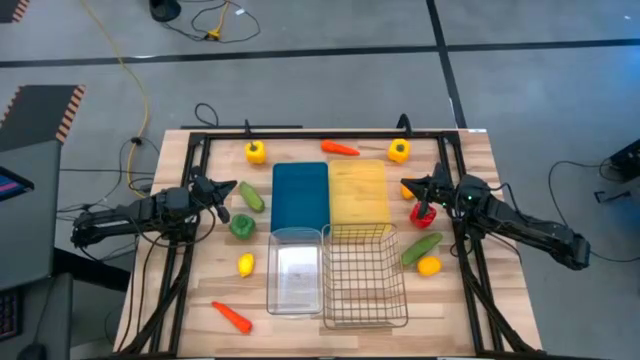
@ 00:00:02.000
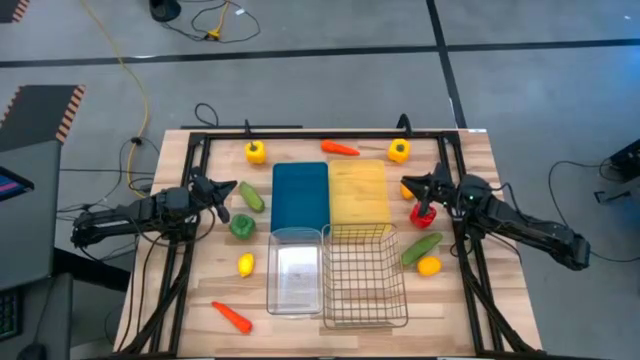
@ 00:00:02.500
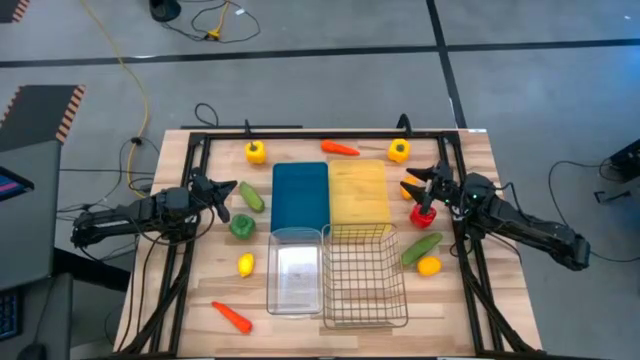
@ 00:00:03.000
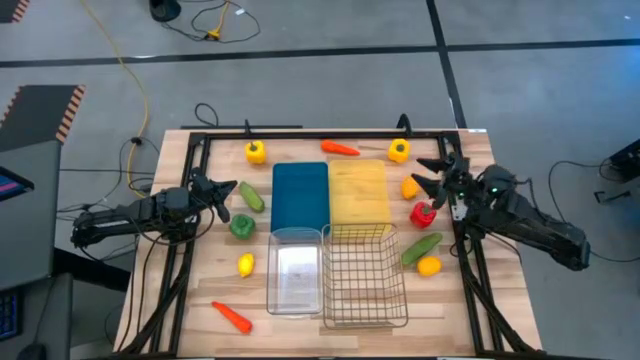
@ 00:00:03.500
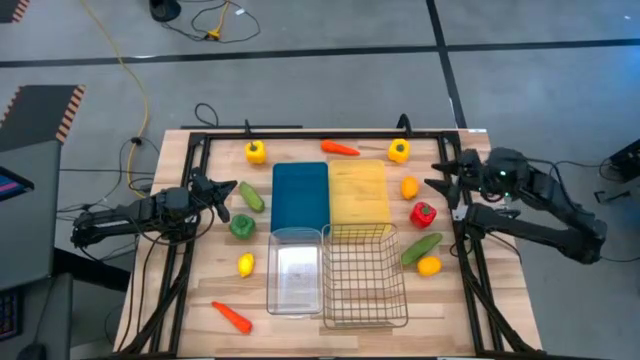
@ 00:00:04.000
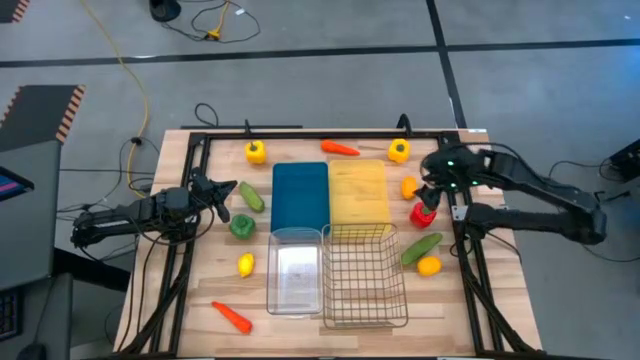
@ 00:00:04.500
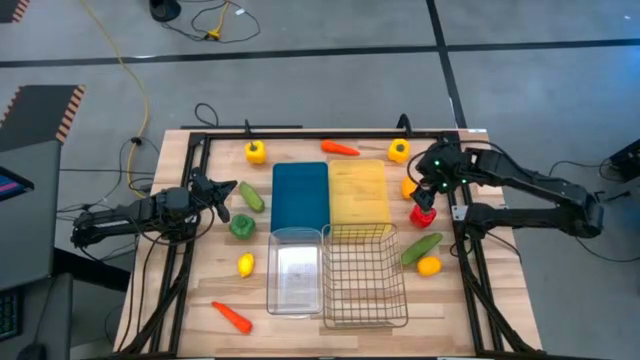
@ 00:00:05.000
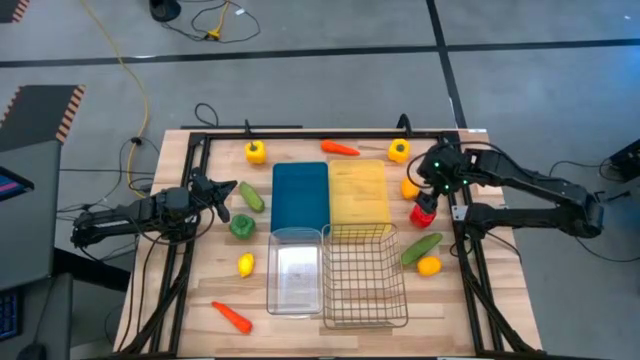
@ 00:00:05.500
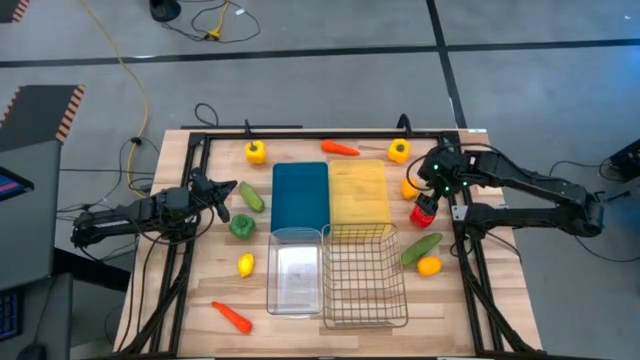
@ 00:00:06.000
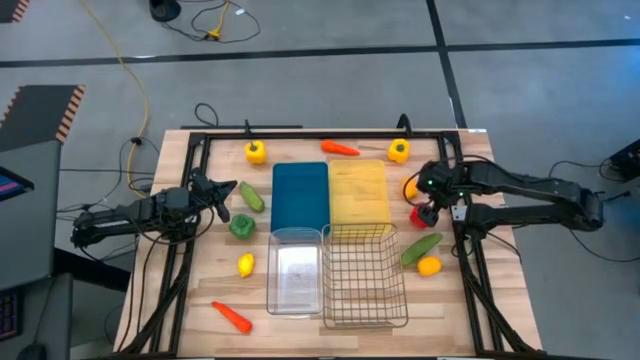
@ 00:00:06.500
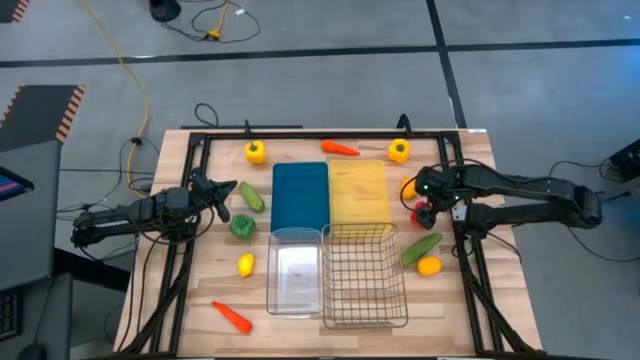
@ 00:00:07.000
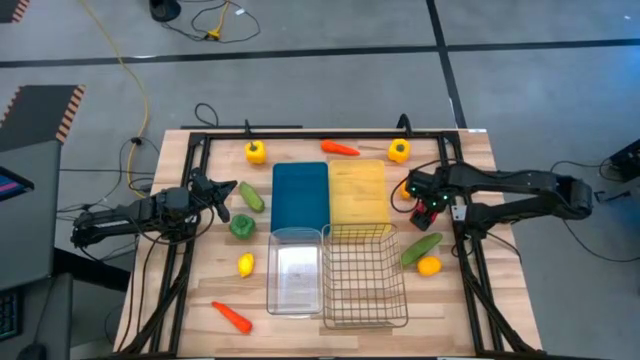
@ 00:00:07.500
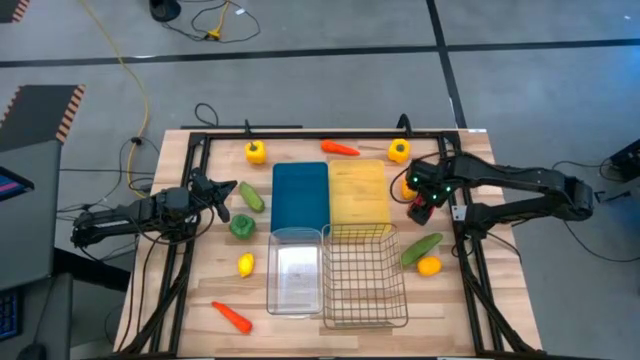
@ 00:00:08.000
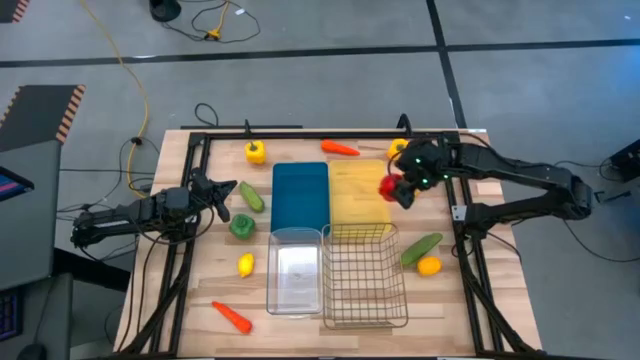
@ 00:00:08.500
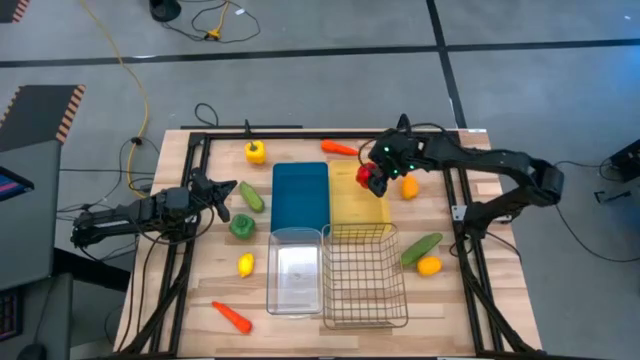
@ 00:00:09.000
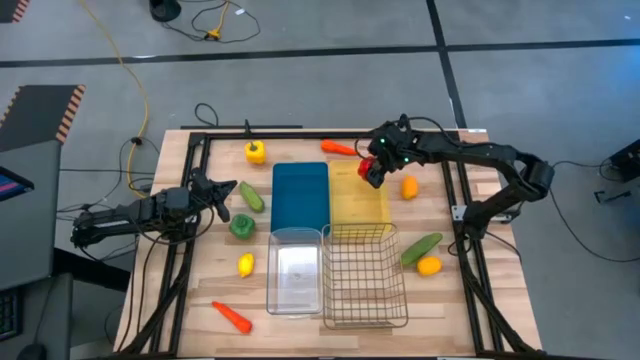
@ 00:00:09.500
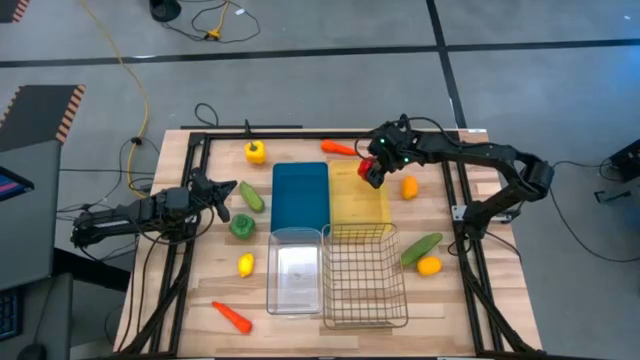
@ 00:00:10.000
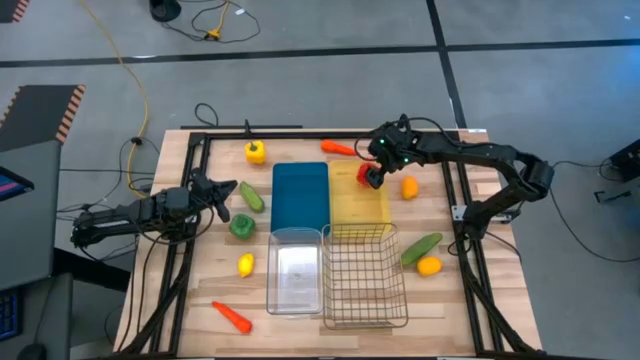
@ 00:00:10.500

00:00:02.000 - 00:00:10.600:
Task: Sort produce into baskets
Put the red bell pepper into the yellow basket

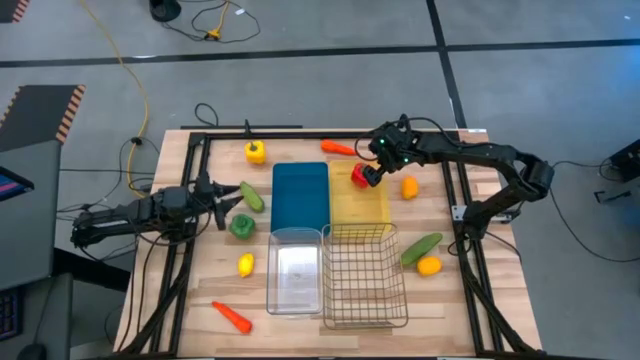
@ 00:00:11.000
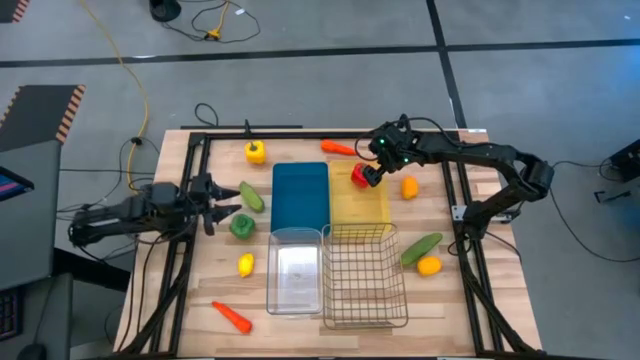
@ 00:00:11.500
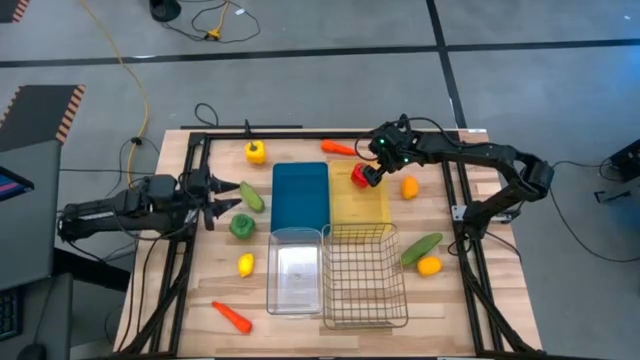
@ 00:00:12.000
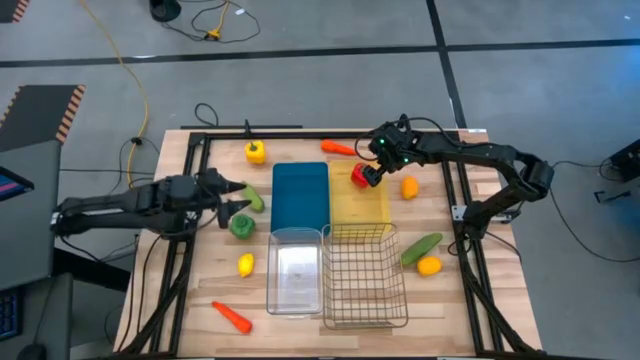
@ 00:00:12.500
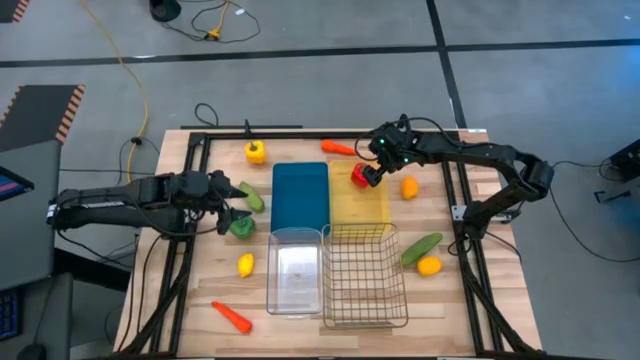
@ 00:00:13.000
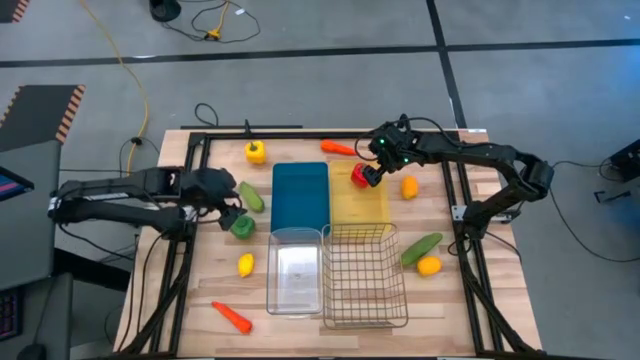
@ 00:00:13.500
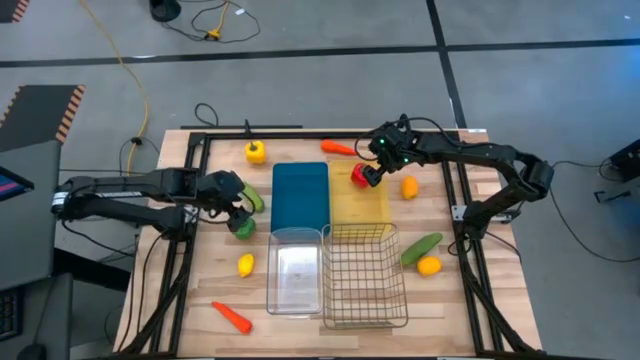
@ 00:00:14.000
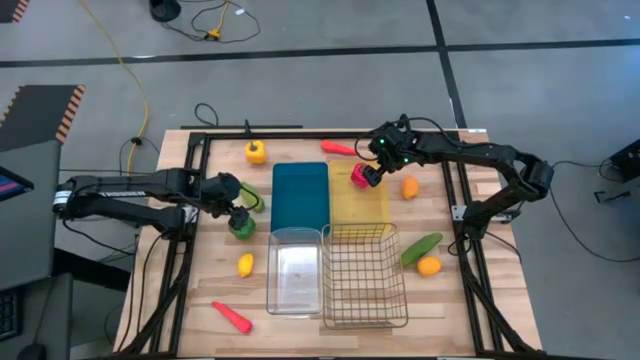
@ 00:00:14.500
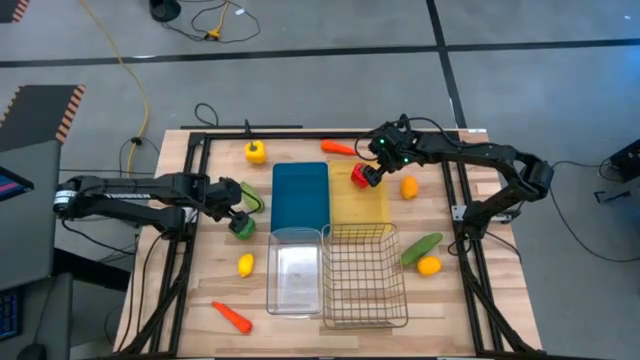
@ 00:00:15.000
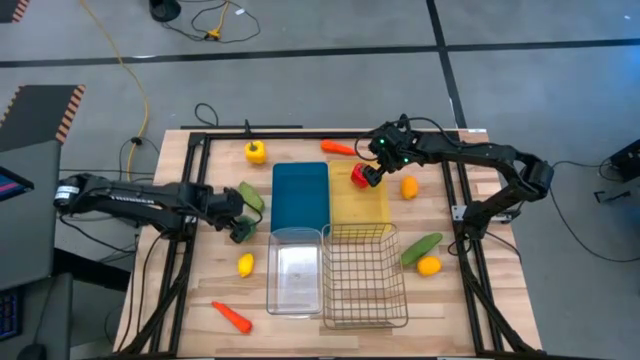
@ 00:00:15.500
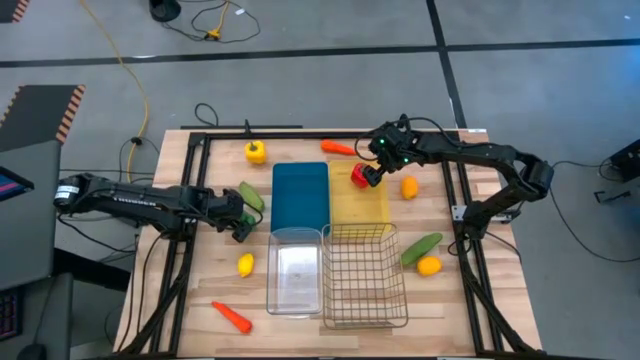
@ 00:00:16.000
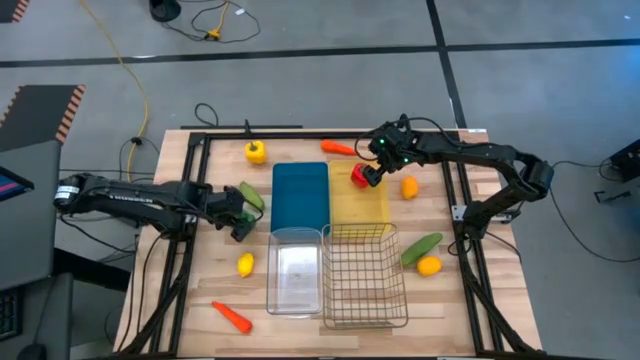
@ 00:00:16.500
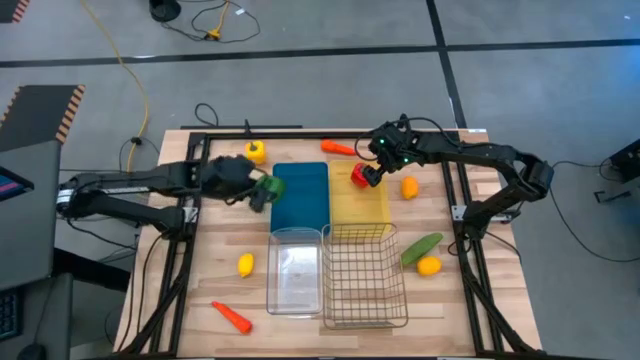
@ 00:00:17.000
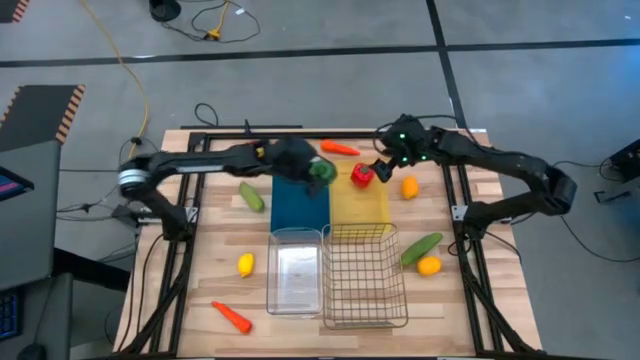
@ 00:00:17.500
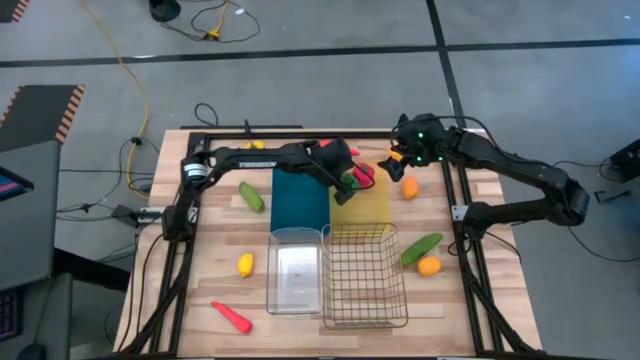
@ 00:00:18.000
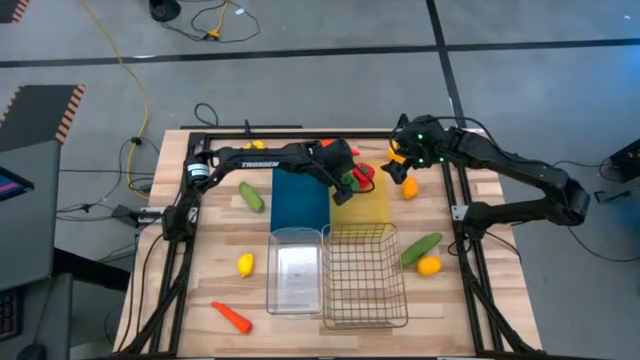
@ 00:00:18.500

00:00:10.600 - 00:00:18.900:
Put the green bell pepper into the yellow basket

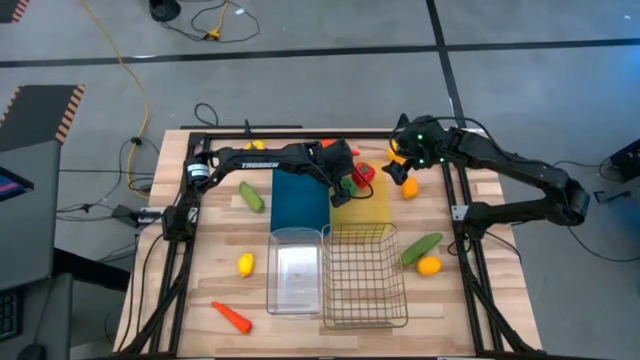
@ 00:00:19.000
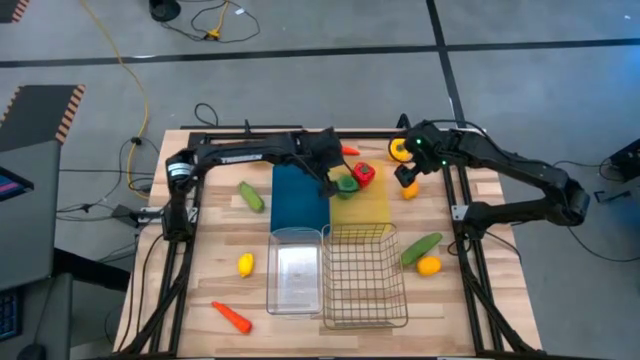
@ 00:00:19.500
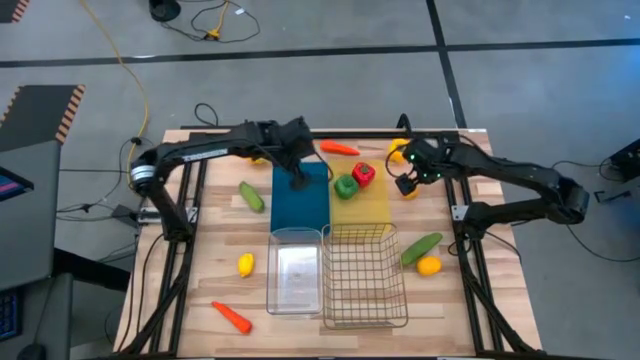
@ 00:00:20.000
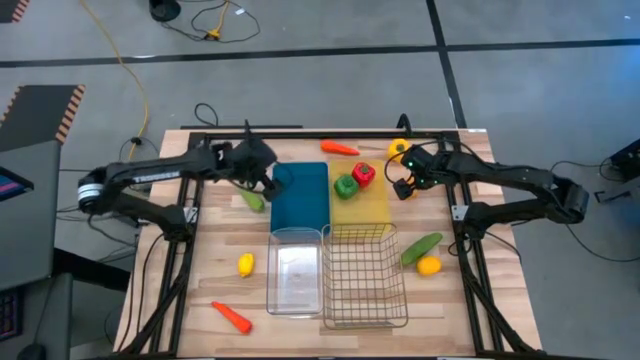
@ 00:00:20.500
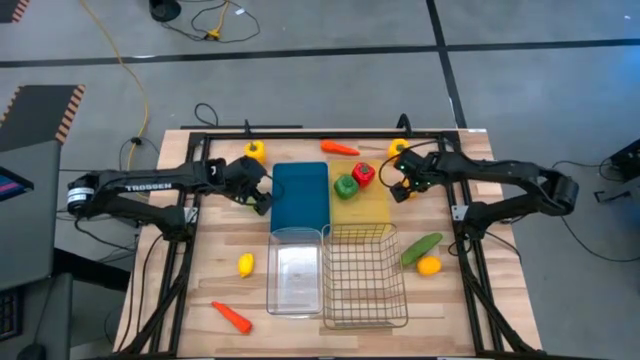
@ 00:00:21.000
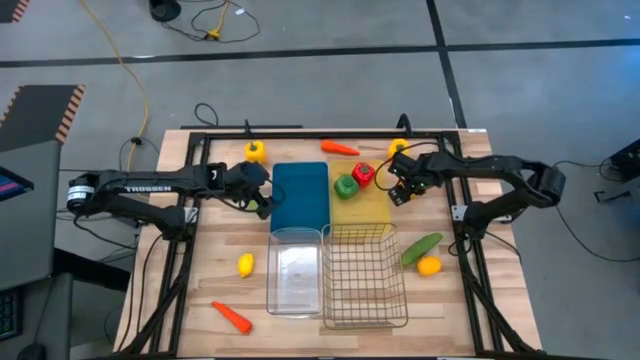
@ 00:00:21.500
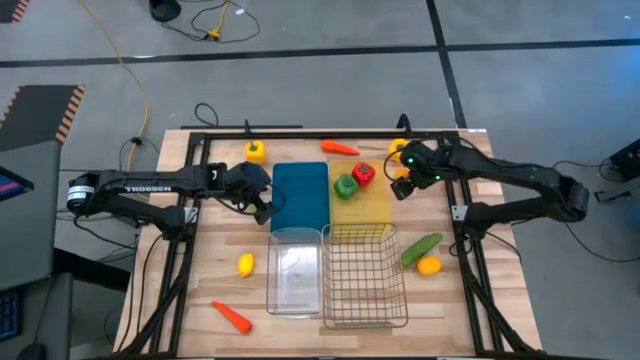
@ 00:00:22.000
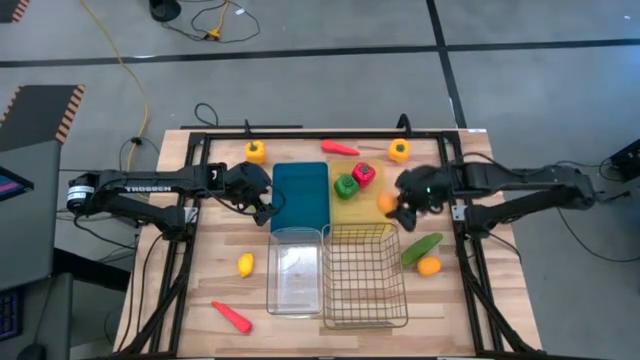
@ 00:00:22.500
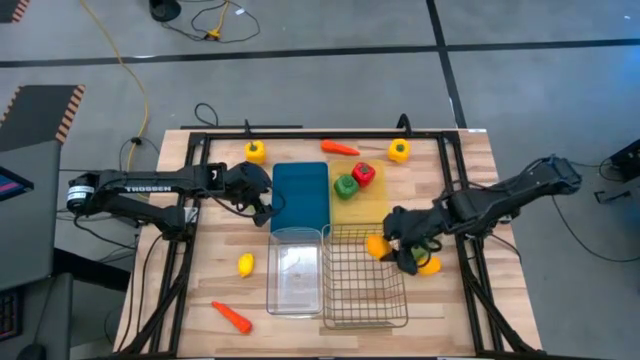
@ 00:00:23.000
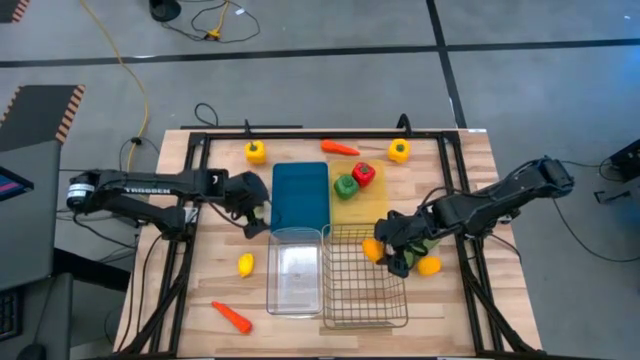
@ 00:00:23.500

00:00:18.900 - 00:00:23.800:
Put the top right lemon into the wire basket
